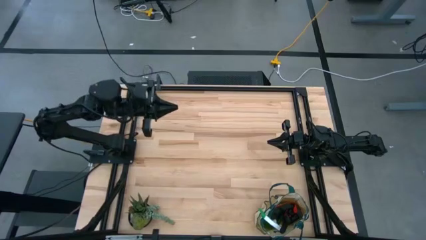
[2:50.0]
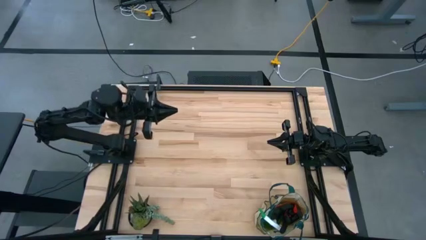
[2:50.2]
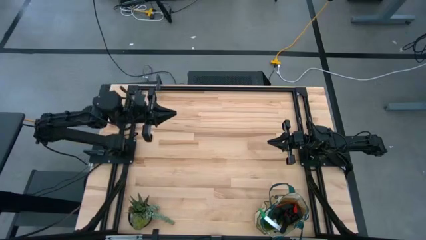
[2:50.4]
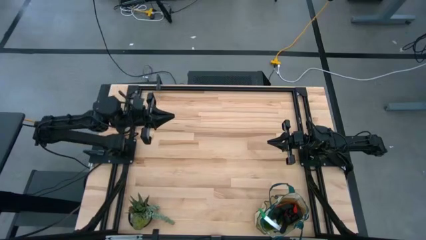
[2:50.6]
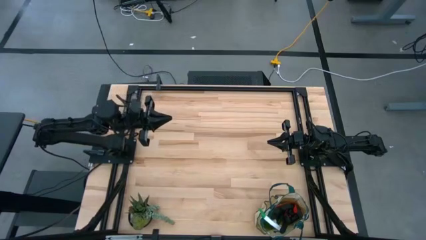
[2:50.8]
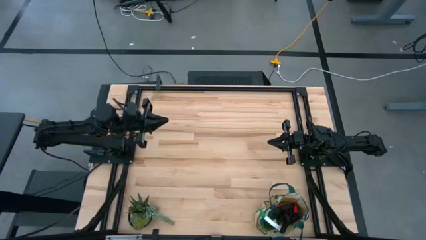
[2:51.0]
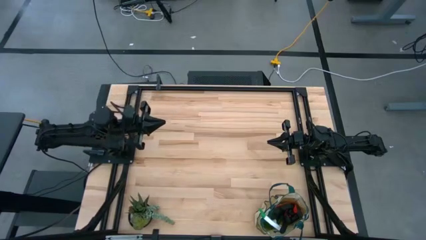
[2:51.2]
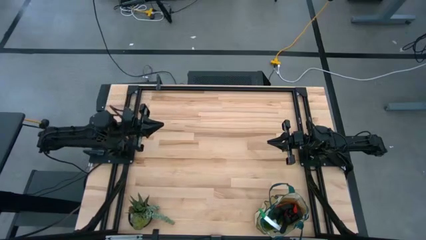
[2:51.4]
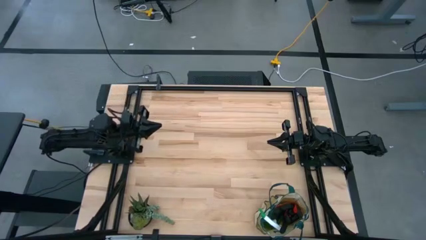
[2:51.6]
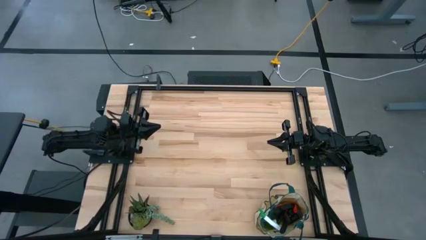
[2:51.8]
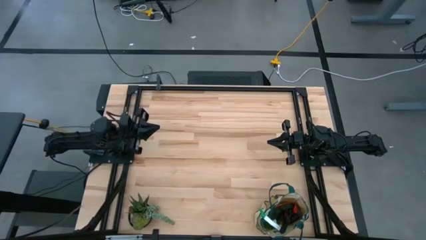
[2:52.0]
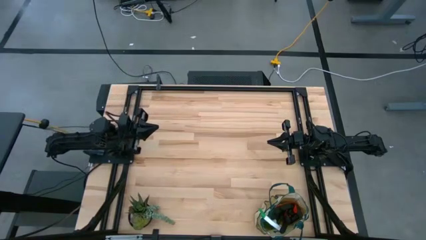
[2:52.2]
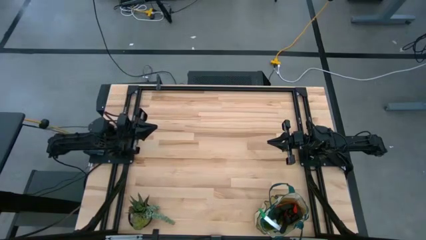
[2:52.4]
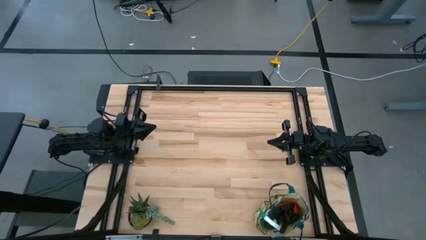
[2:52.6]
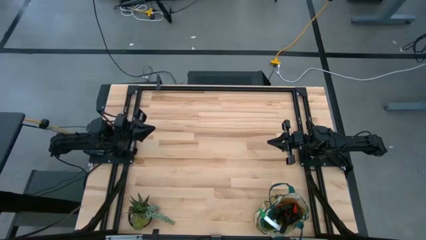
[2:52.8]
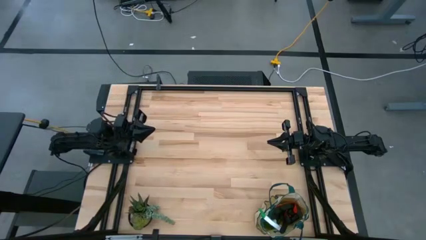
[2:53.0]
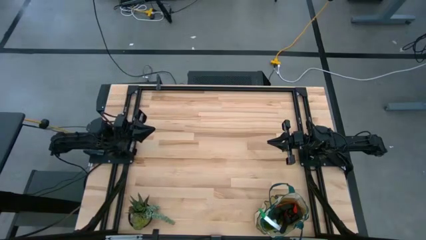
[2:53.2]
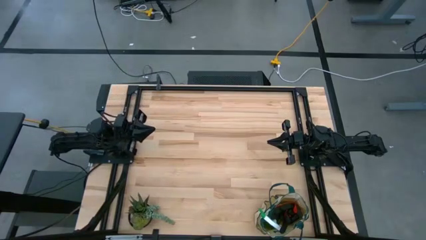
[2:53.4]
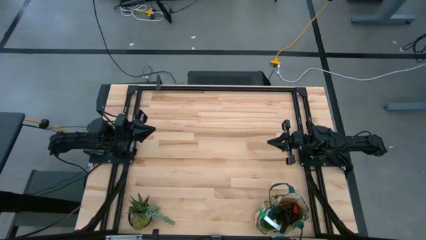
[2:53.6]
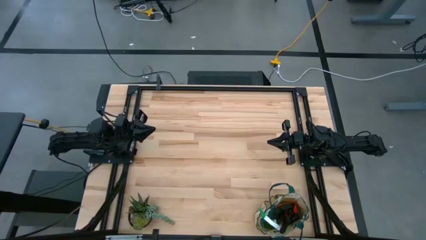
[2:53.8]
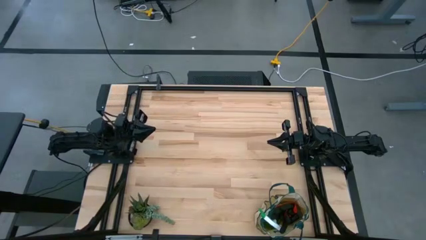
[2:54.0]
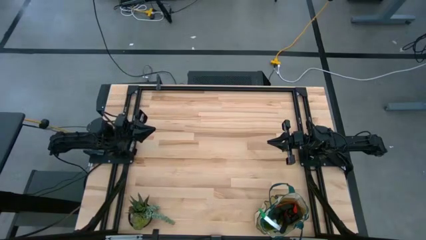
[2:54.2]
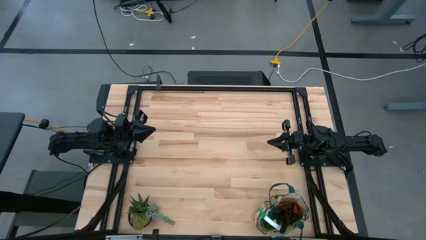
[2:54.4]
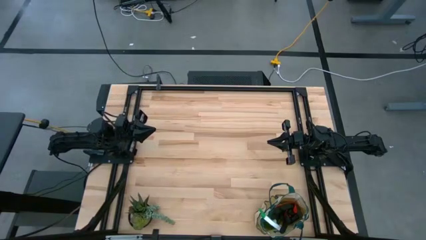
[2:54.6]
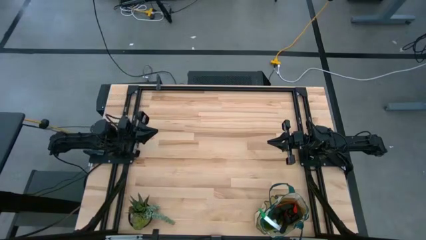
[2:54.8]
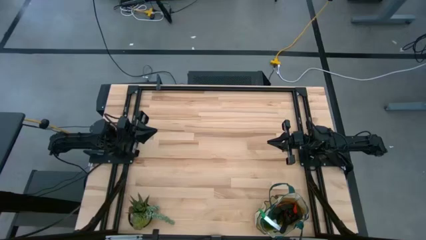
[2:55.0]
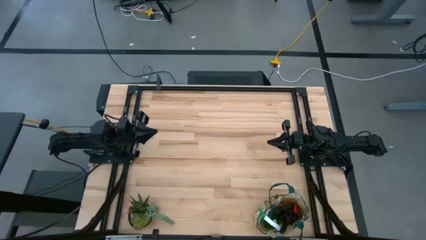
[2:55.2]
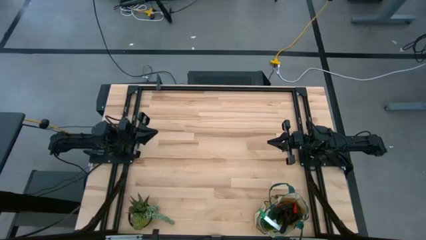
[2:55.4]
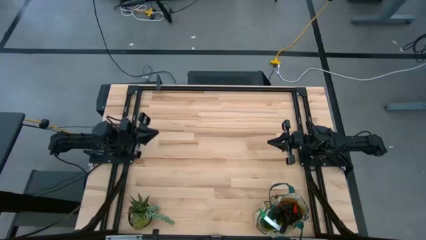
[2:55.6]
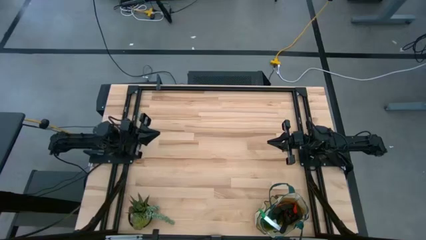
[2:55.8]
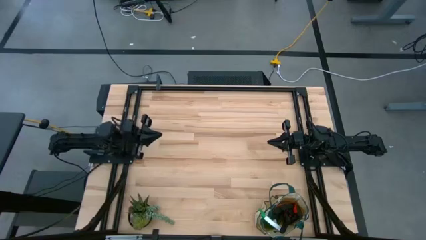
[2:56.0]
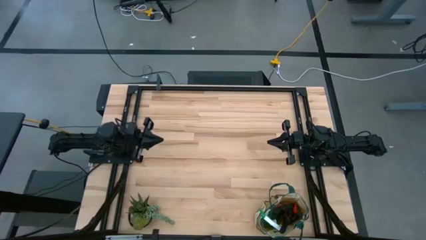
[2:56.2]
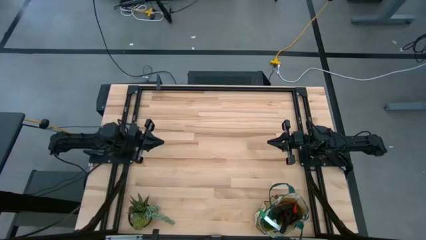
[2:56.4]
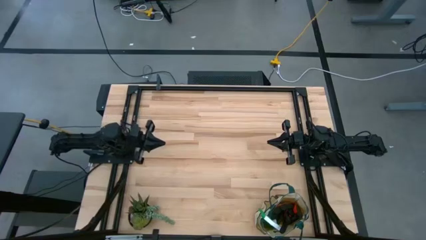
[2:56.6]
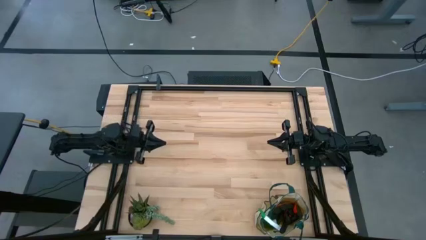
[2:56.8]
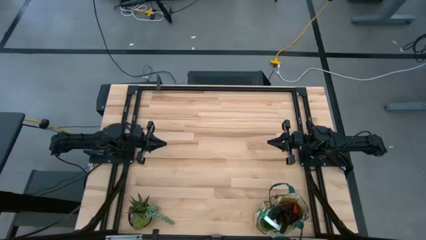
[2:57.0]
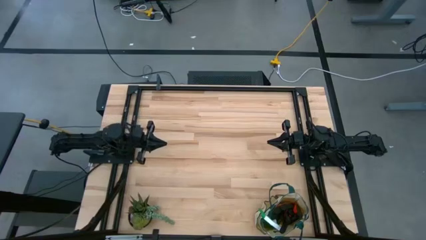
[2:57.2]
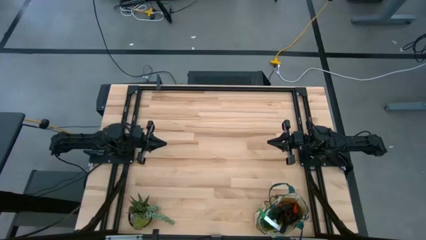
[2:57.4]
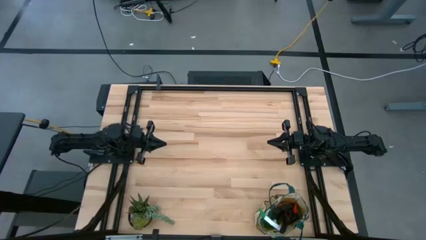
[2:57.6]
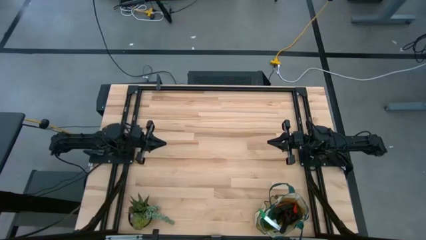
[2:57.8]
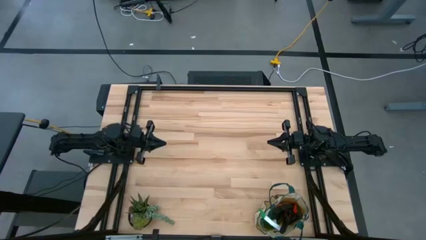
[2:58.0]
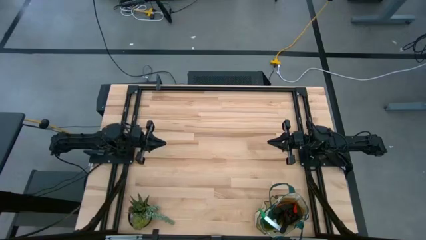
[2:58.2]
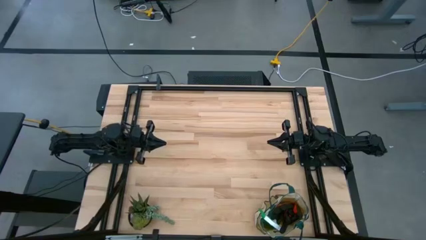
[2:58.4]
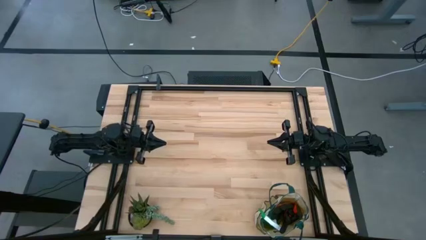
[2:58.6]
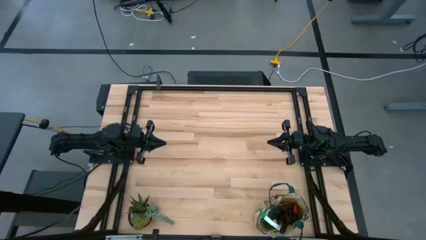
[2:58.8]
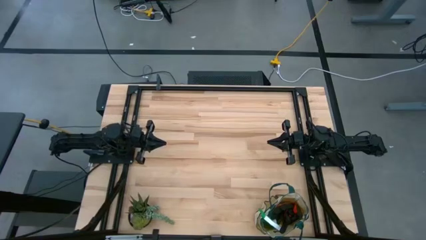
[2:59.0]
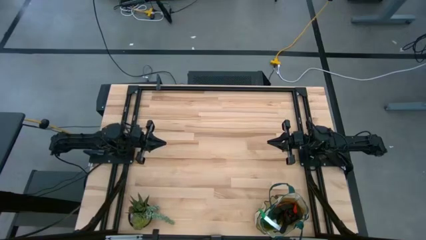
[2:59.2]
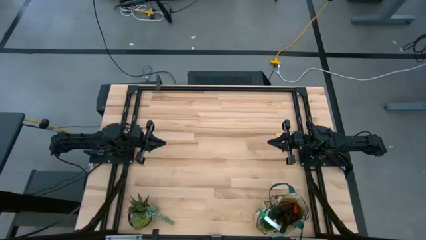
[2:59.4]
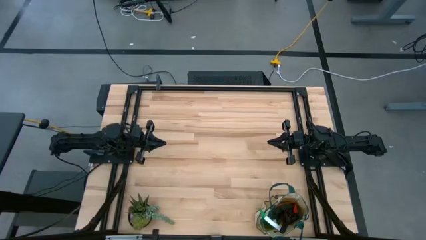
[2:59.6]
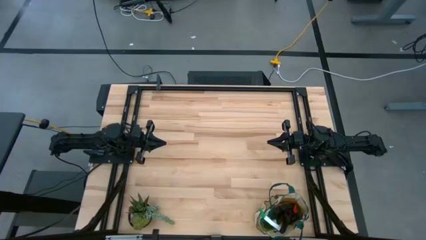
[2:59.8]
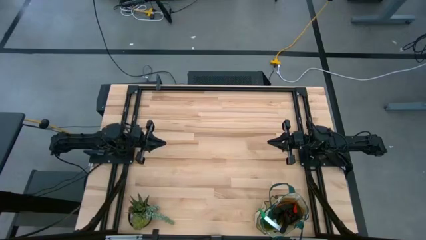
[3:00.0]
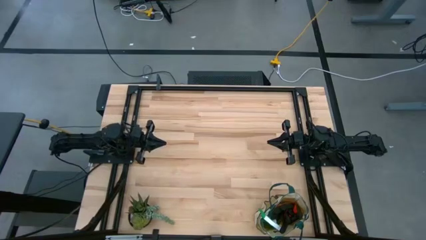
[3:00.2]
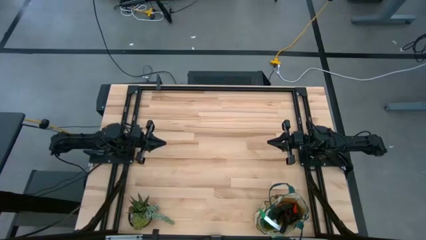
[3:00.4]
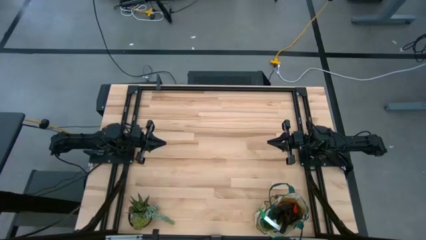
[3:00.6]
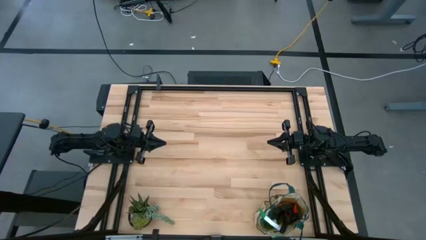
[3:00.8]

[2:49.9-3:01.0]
Task: Pick & Place Garden tools in Gardening bag
Return to Home Position

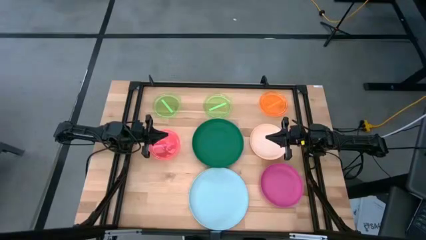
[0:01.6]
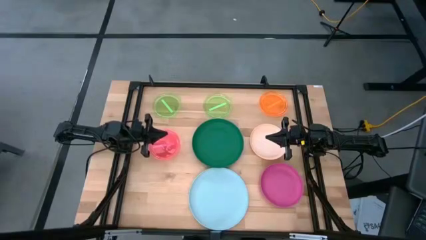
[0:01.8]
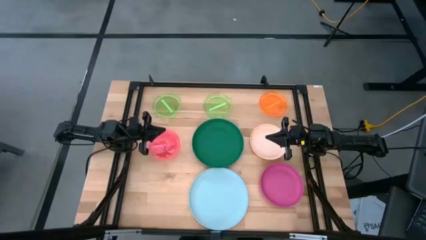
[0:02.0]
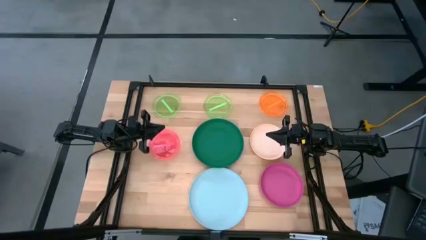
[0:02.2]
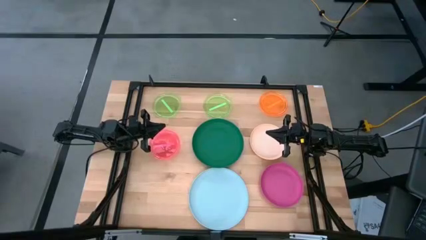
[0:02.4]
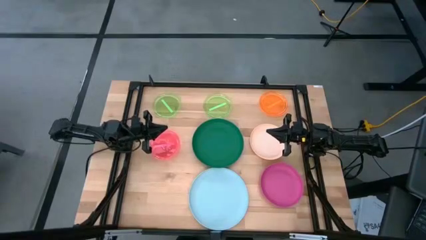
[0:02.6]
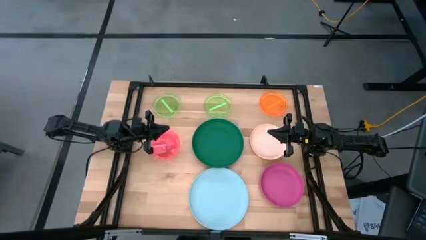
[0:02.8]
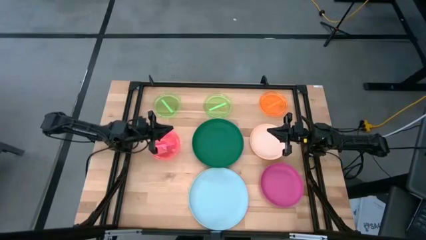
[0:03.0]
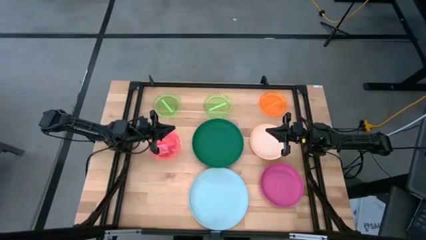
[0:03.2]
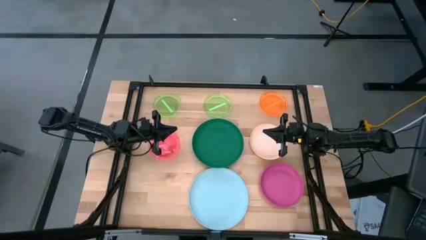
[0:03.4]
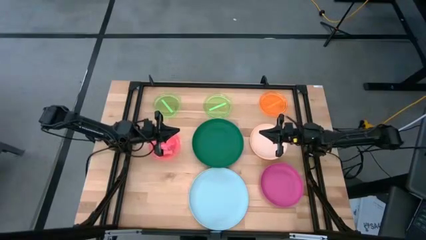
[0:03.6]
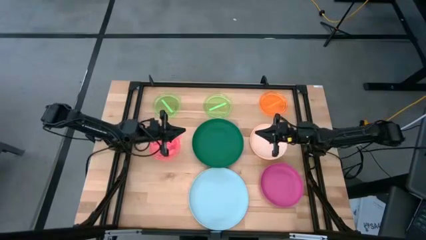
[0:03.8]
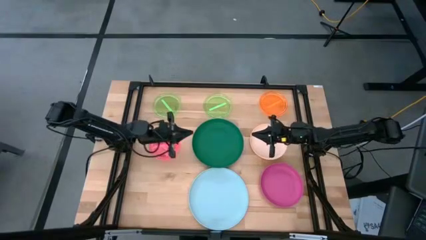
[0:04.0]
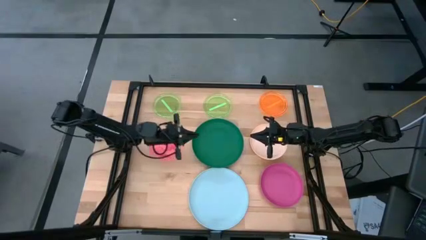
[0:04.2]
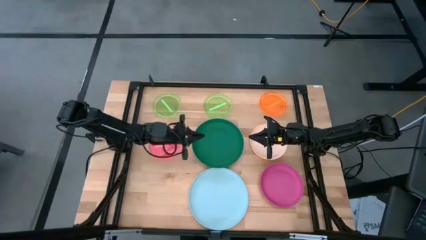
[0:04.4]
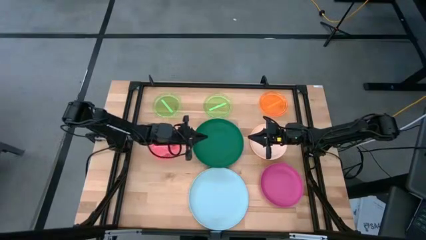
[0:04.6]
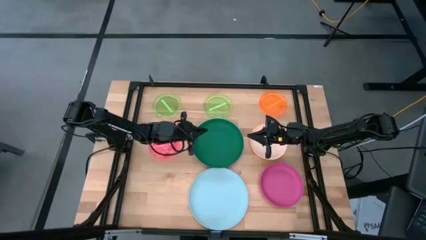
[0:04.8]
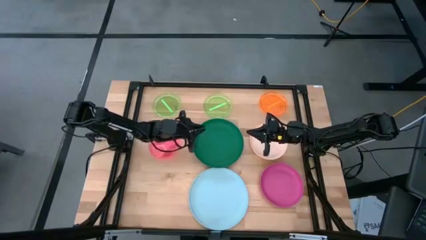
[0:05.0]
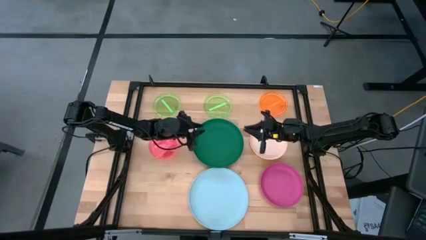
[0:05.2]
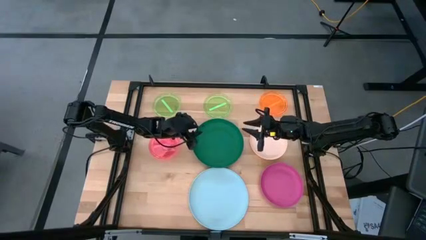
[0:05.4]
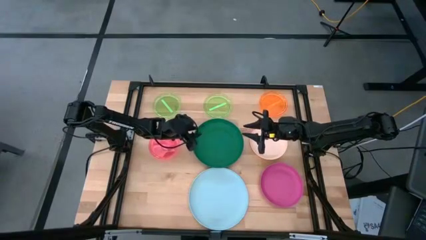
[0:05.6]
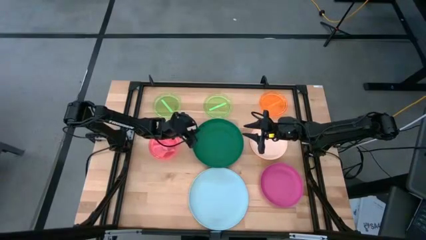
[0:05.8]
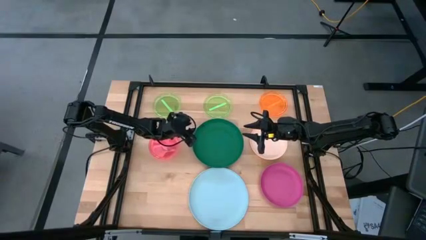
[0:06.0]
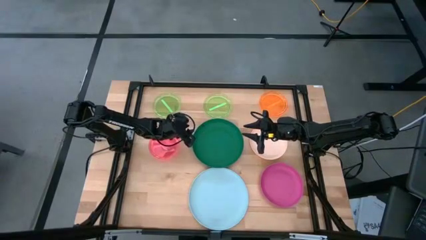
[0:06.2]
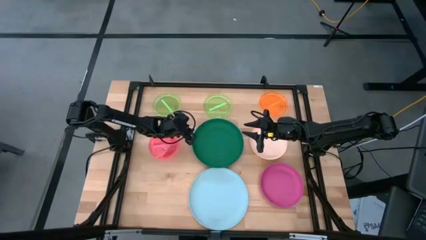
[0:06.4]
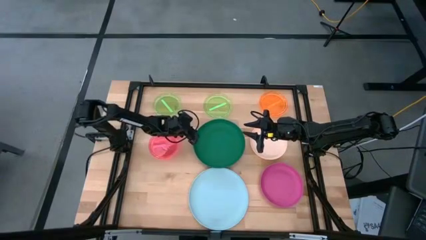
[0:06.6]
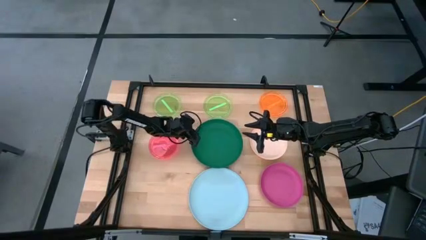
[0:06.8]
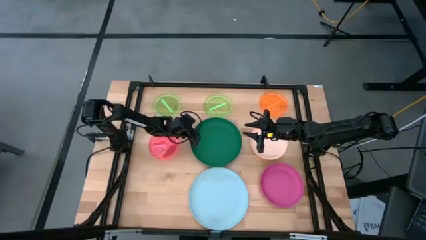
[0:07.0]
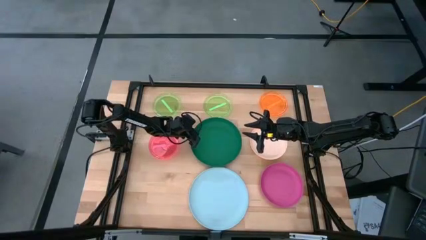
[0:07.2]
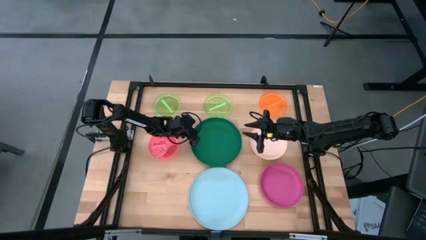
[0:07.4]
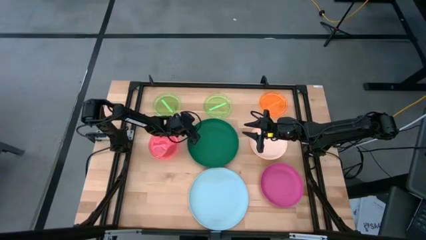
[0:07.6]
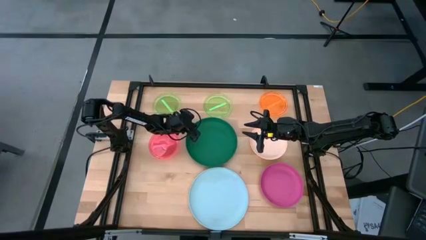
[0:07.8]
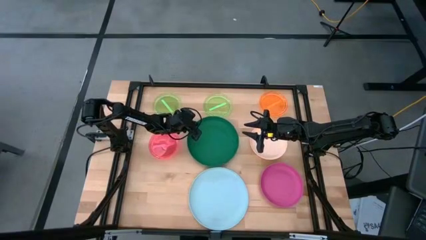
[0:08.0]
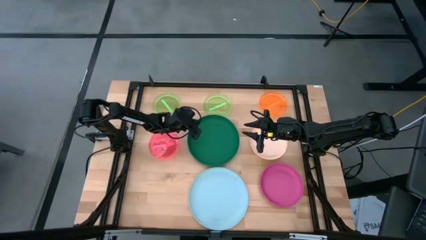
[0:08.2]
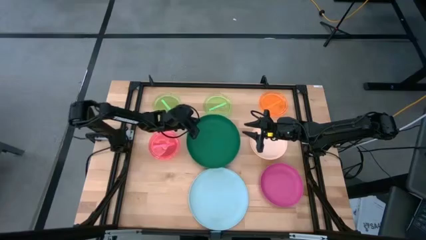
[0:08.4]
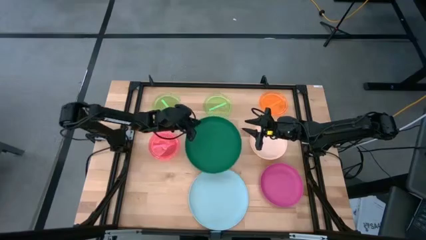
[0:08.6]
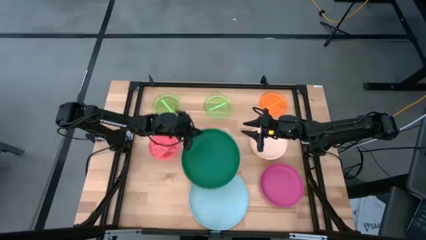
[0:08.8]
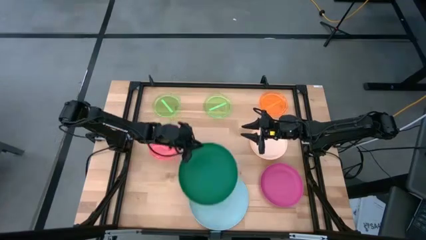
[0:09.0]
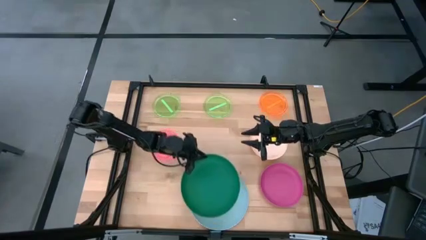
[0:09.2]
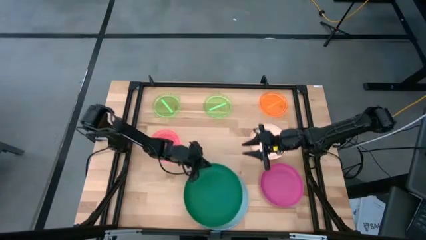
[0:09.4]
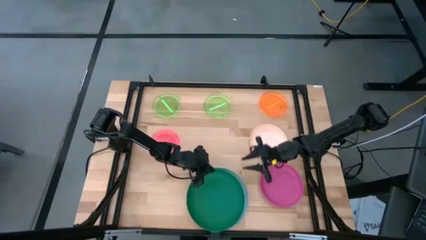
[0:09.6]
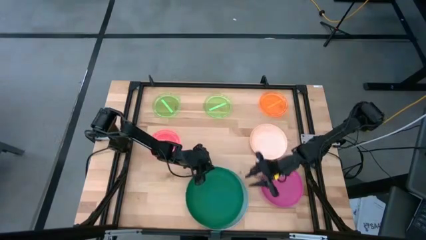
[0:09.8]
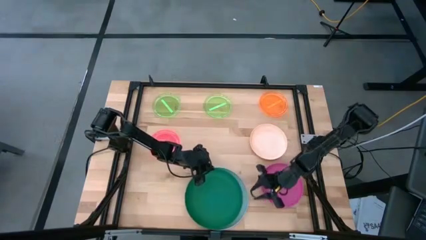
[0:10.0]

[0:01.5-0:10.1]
Task: Stack plastic plates
Stack the green plate on top of blue plate
